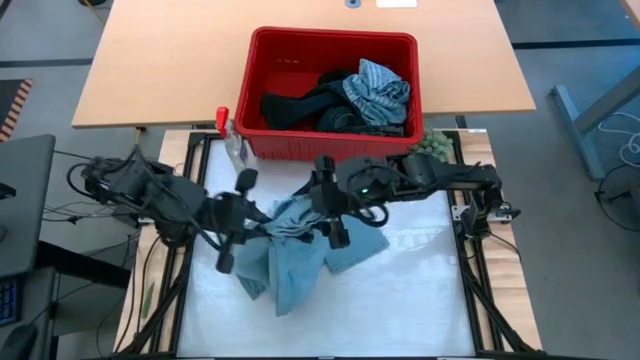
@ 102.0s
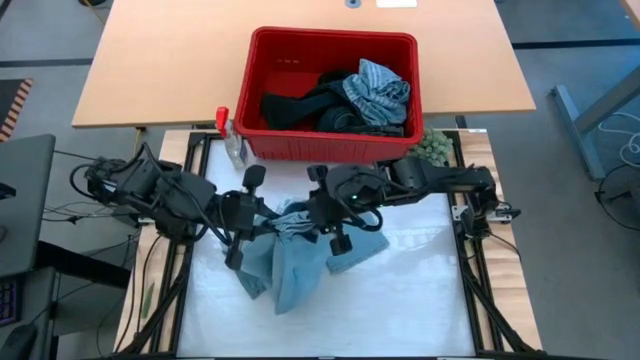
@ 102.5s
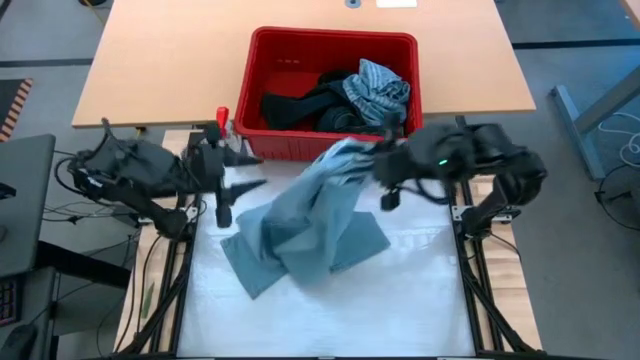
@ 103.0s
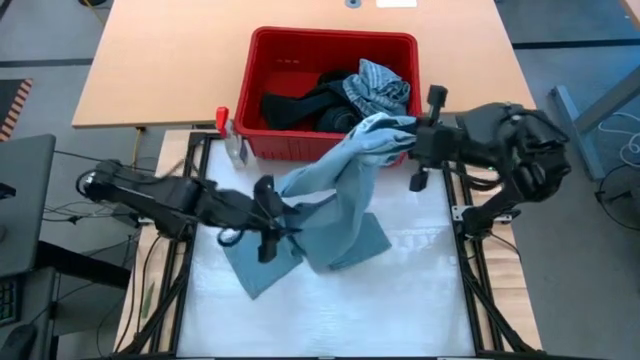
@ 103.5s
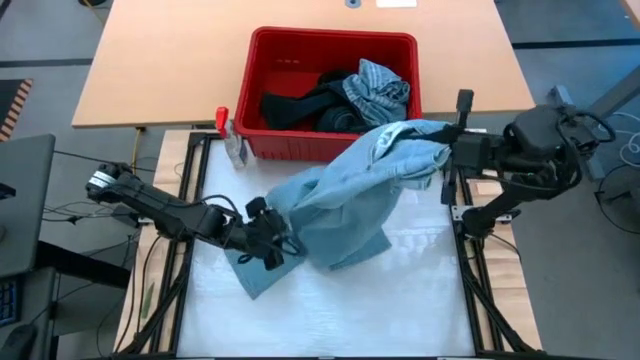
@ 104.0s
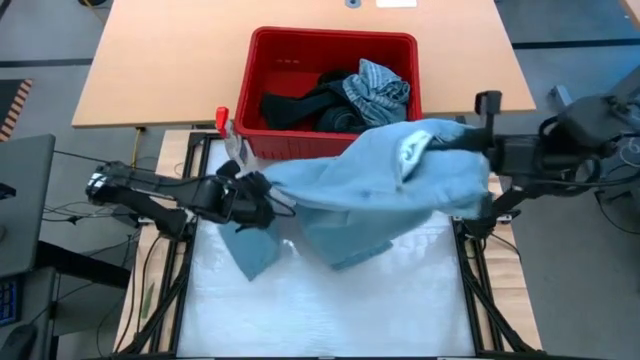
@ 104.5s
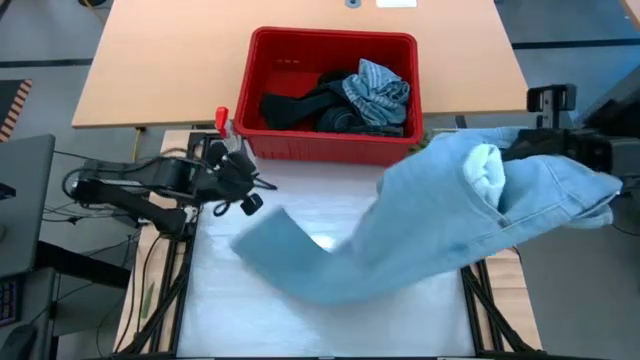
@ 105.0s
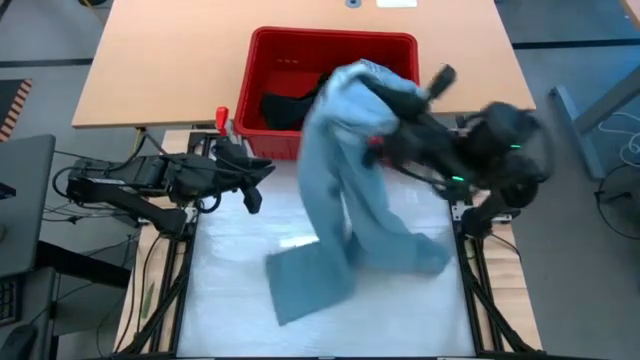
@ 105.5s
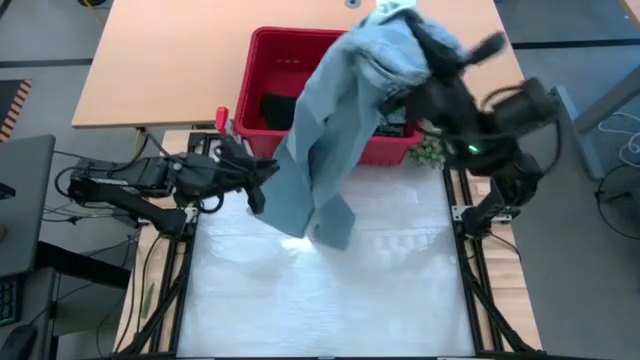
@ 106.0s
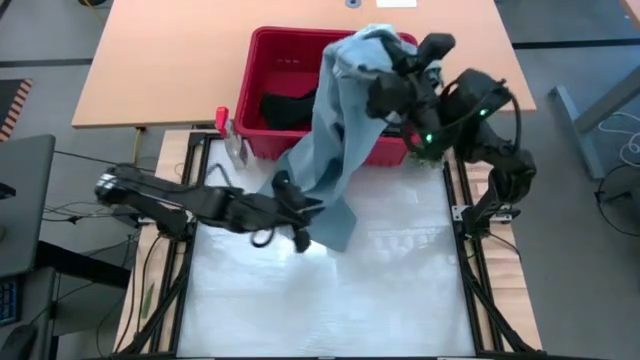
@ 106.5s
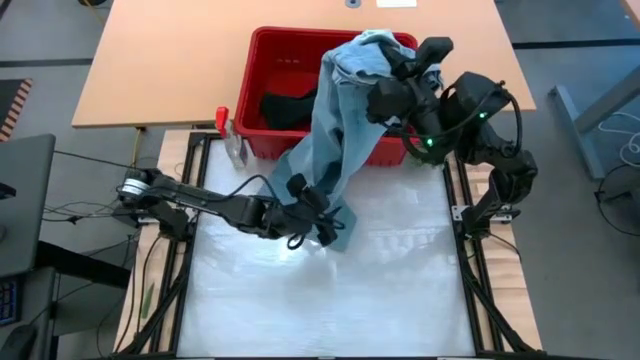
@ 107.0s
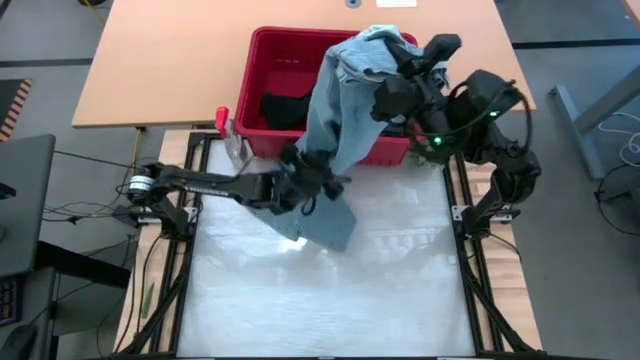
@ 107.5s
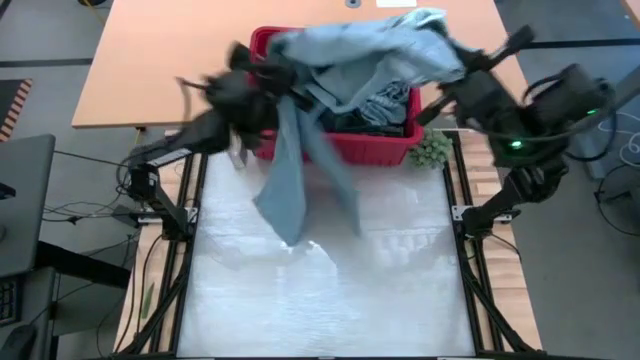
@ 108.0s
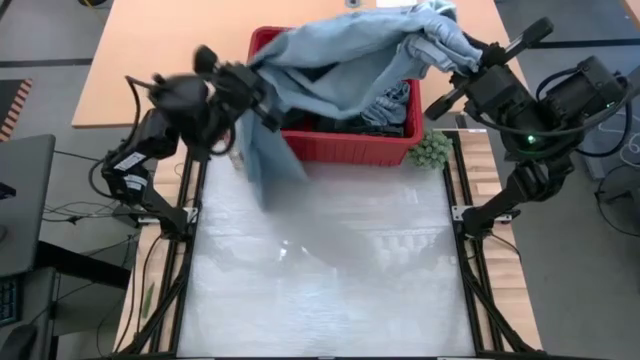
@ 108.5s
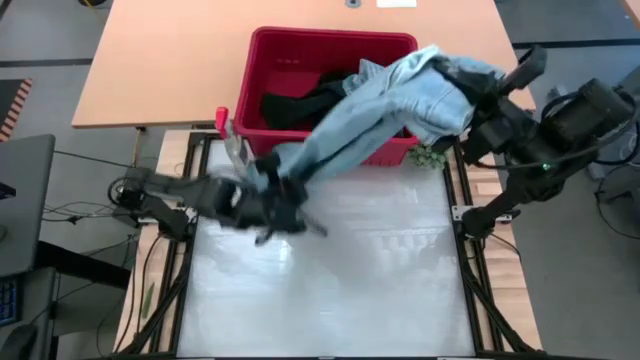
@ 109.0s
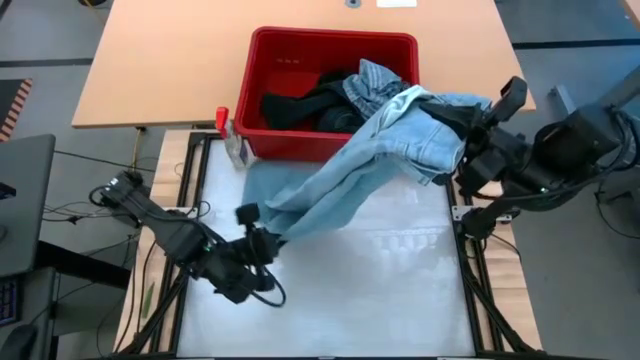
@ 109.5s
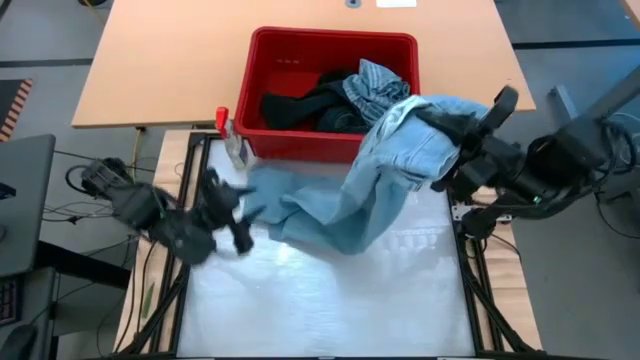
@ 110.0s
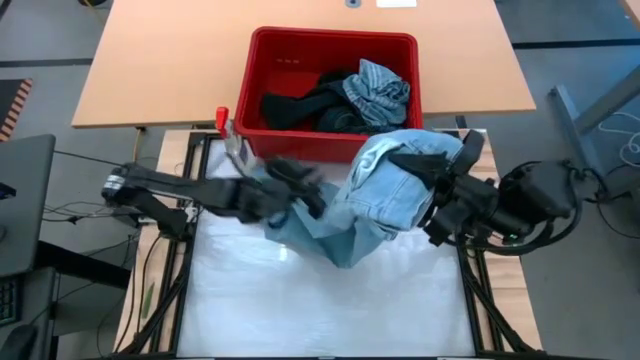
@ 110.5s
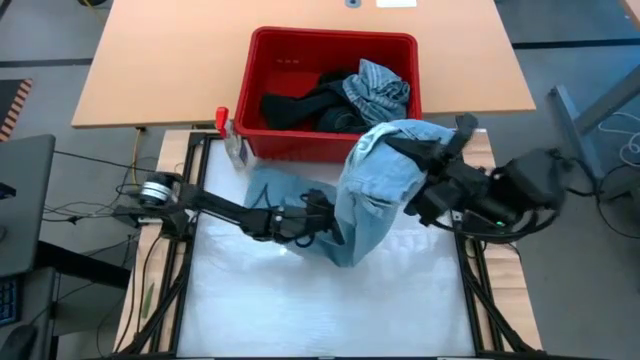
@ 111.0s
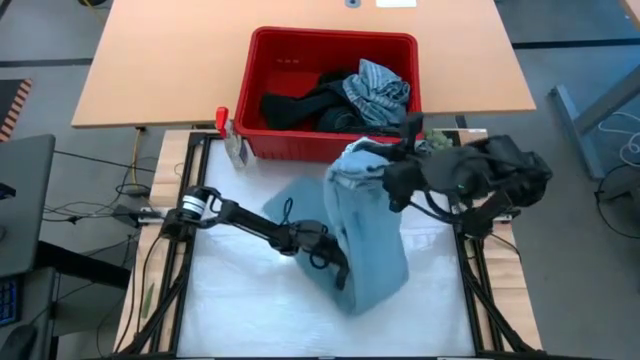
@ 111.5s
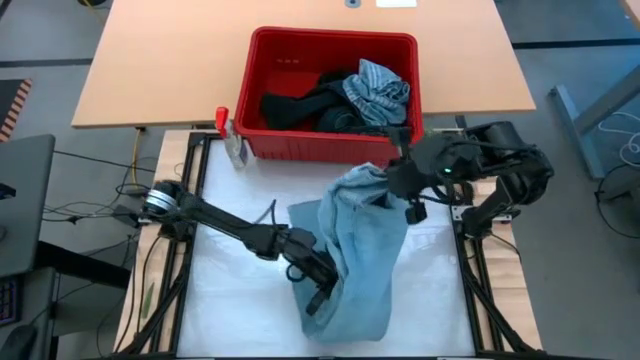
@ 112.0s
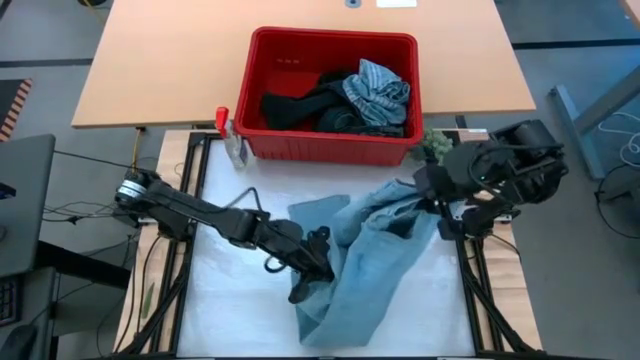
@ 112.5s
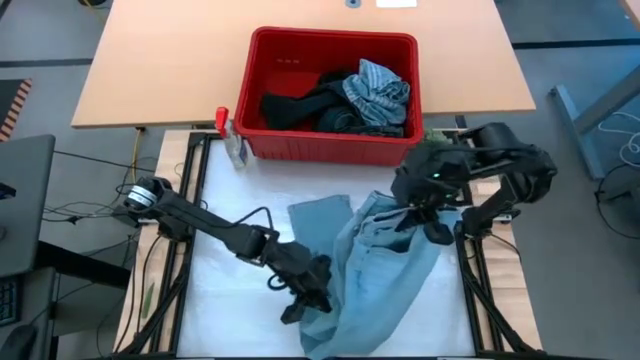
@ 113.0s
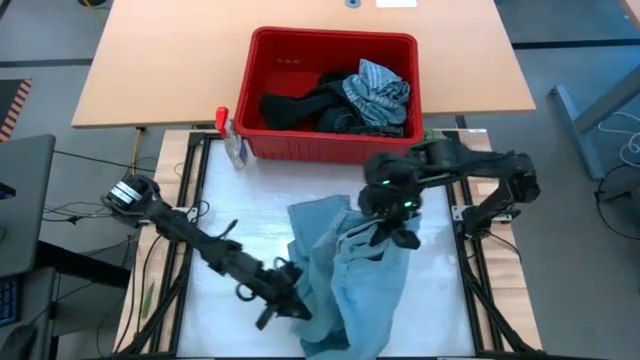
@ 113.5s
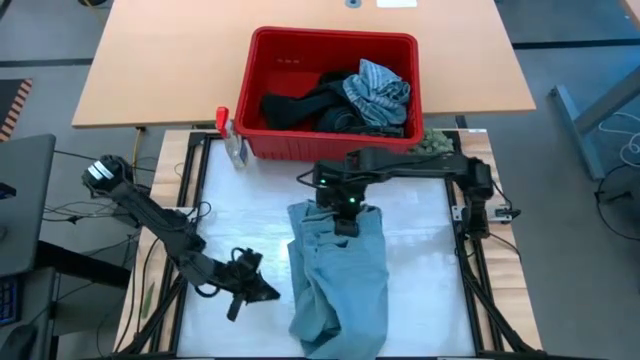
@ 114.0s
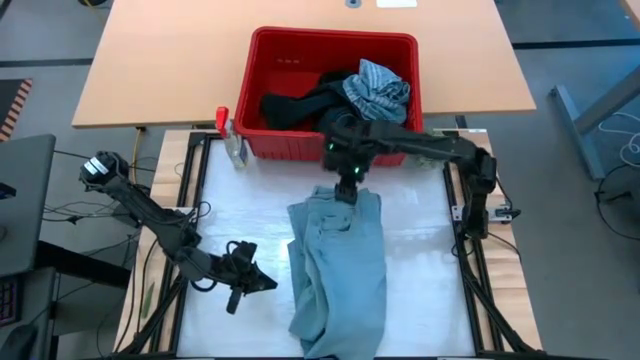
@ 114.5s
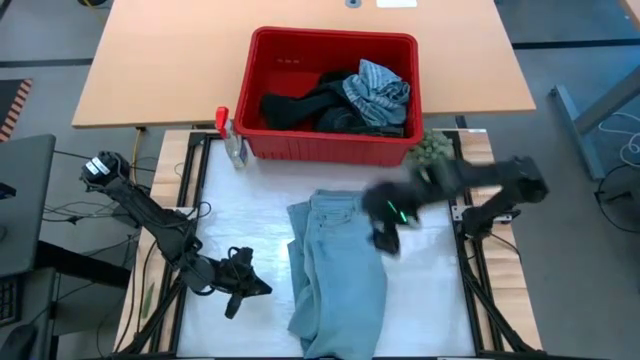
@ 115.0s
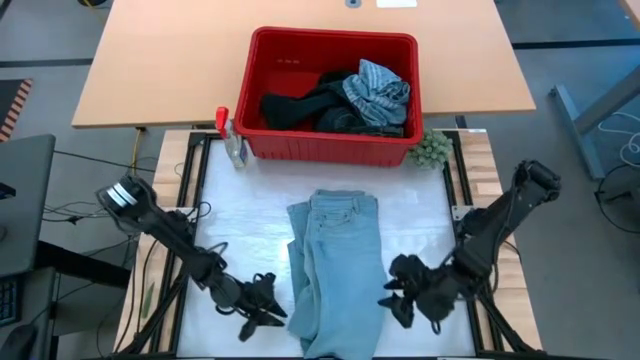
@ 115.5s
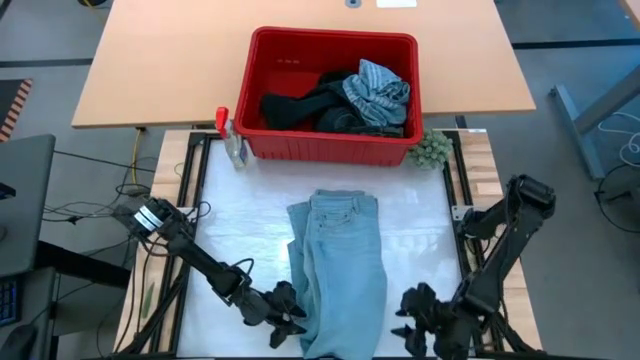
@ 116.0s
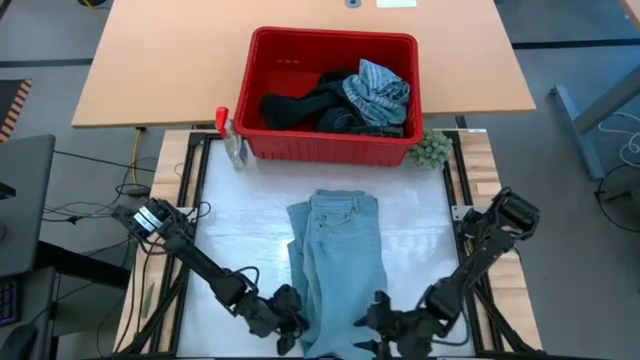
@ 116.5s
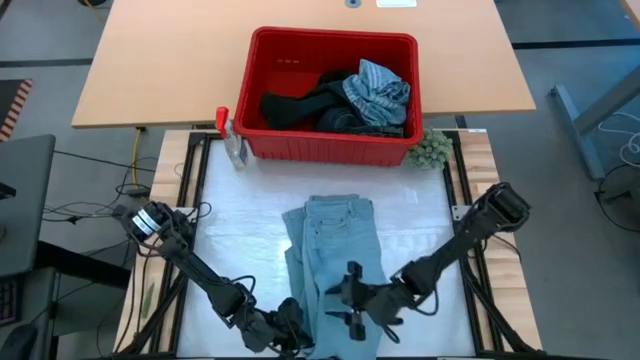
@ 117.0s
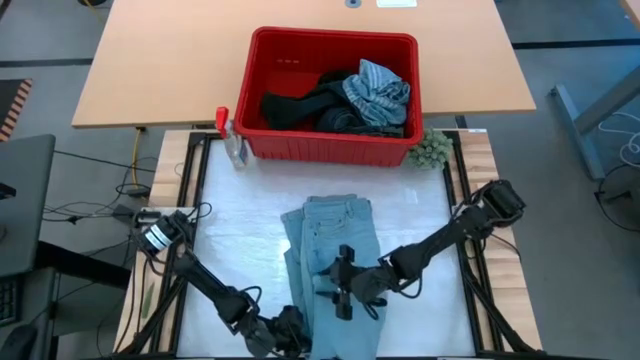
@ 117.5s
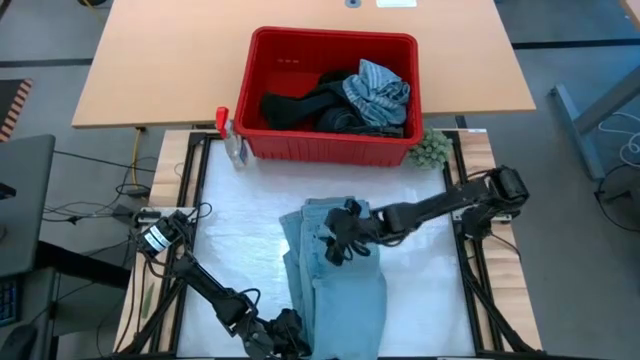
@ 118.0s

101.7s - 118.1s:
Task: Fold laundry
Fold the blue pants from the red laundry bin

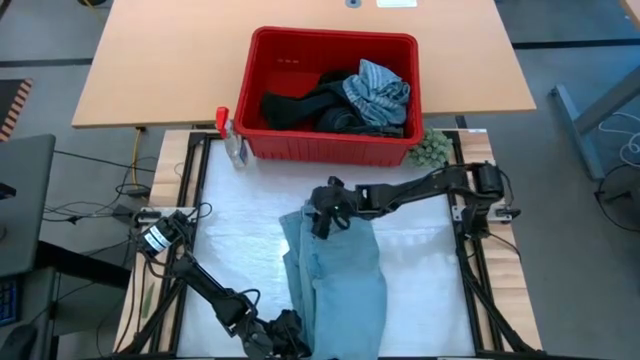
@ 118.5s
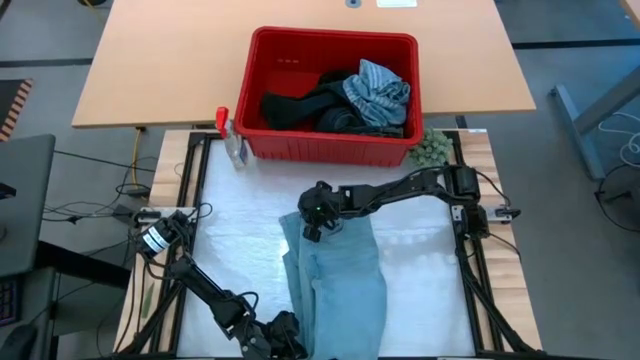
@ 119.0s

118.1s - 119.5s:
Fold the blue pants from the red laundry bin

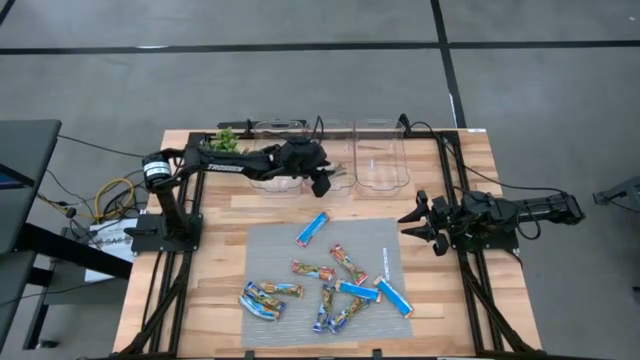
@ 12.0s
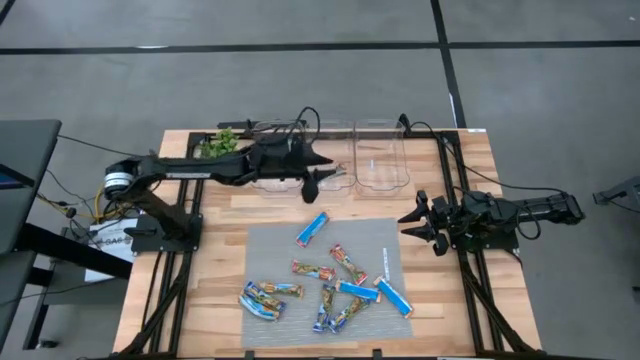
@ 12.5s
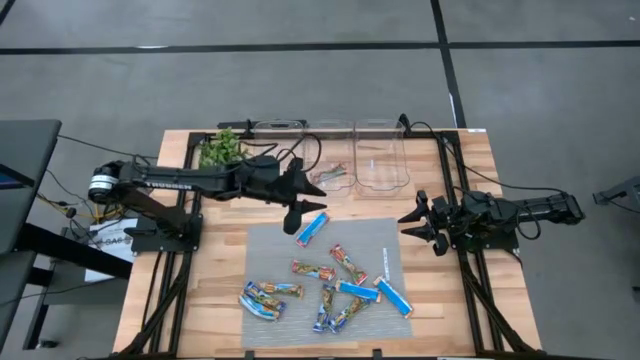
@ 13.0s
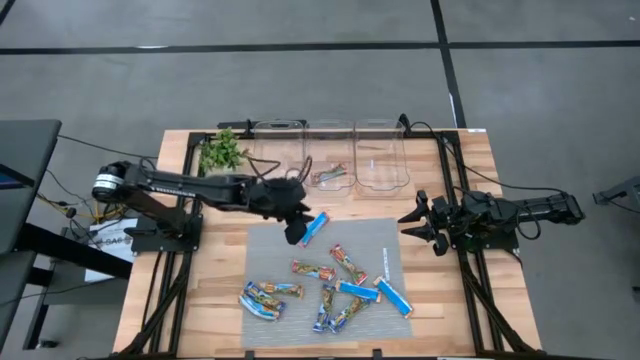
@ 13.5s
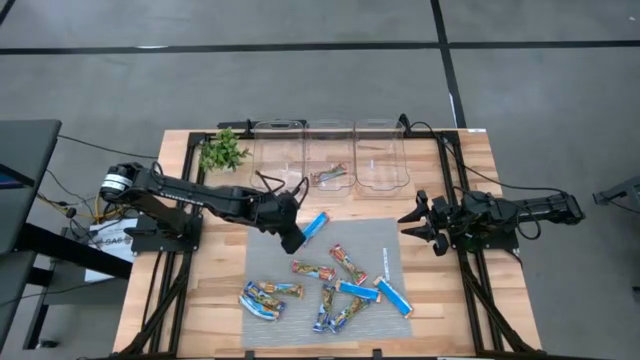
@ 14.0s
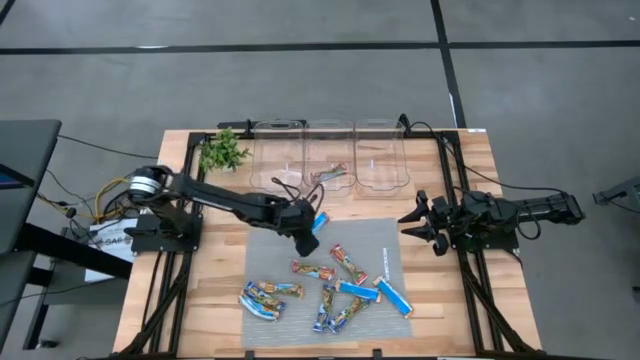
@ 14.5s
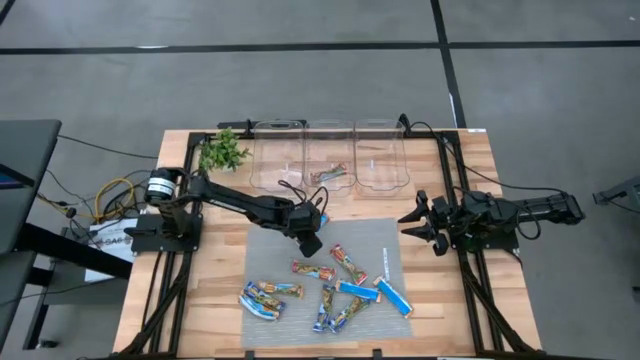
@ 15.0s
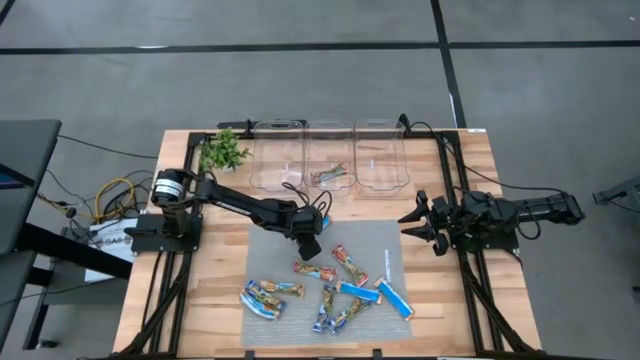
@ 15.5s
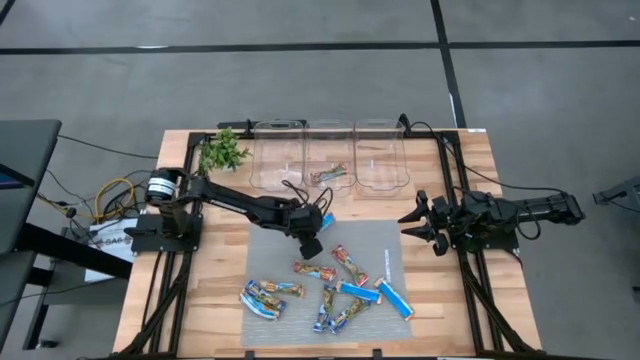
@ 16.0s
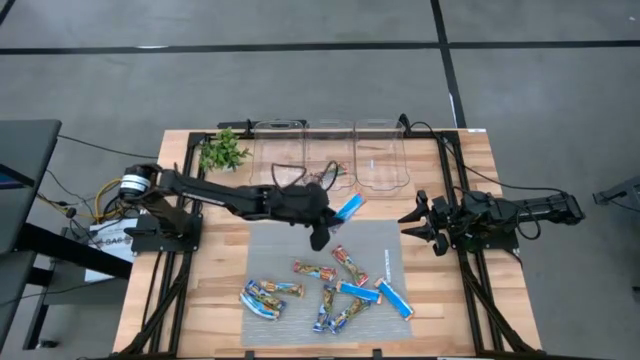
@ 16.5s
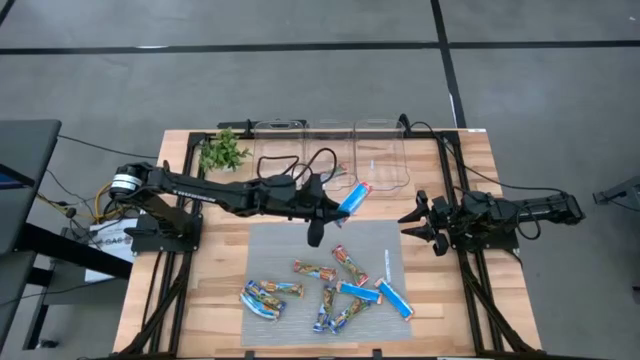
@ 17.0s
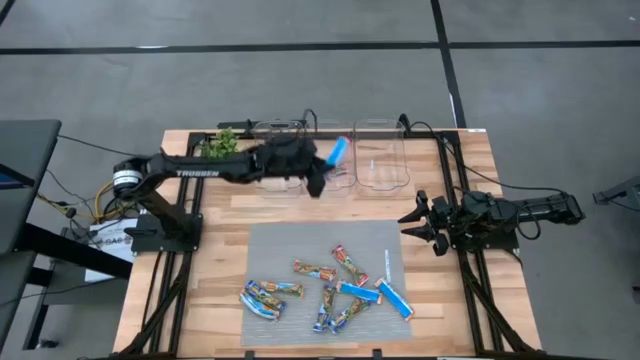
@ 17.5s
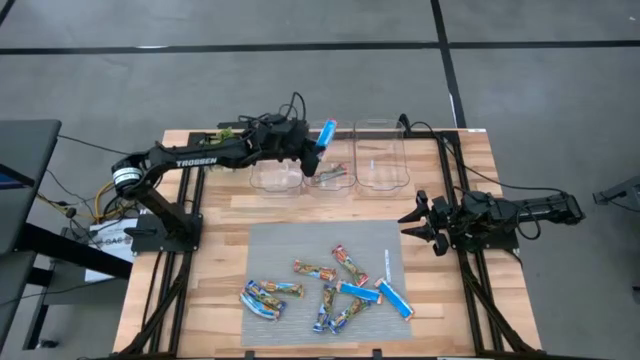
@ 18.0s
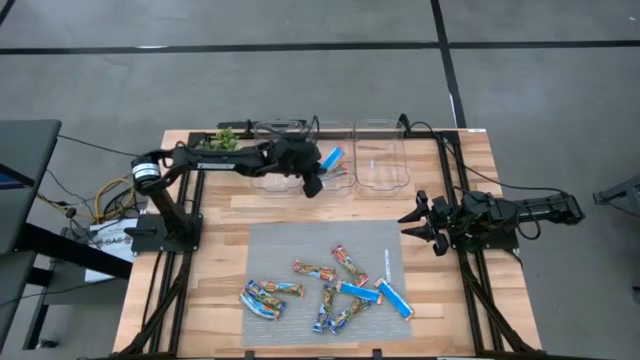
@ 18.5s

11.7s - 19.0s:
Task: Pick and place Granola Bars by type
Put the red granola bar into the middle transparent bin
